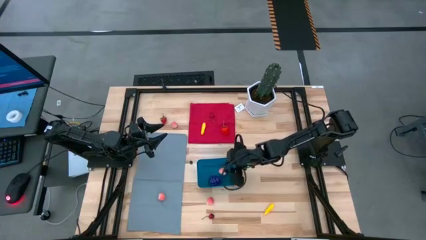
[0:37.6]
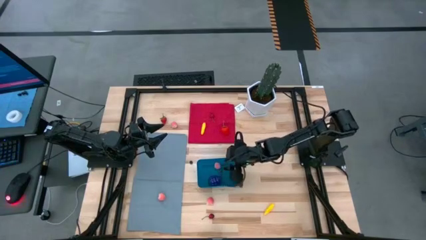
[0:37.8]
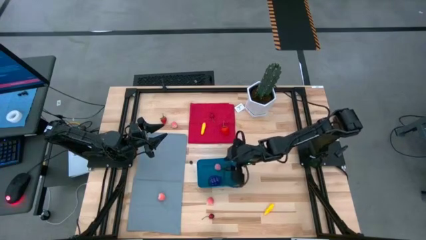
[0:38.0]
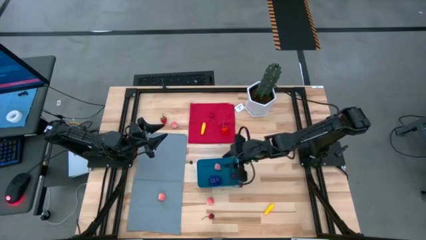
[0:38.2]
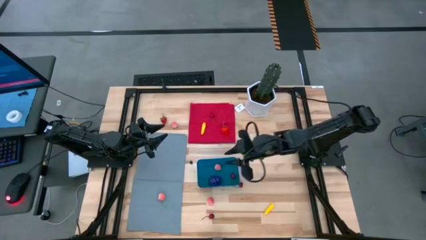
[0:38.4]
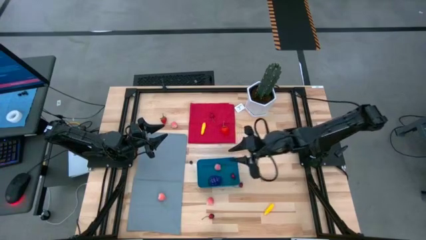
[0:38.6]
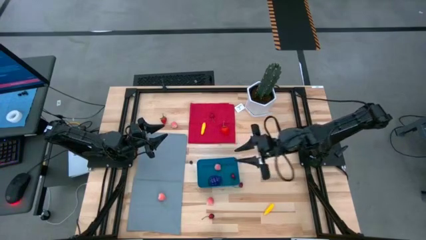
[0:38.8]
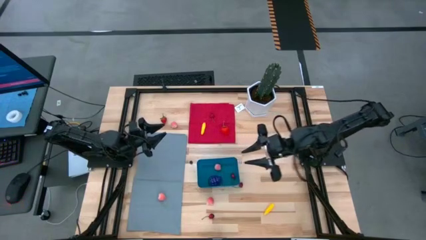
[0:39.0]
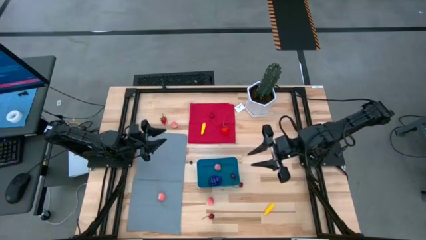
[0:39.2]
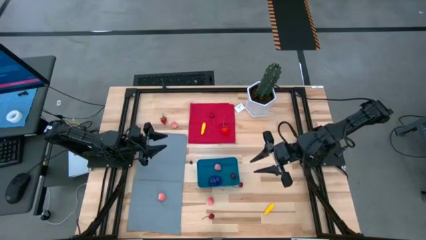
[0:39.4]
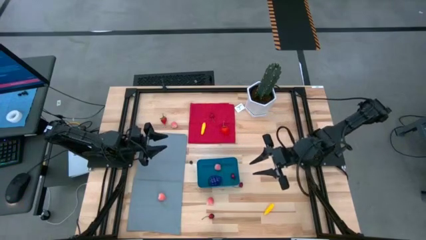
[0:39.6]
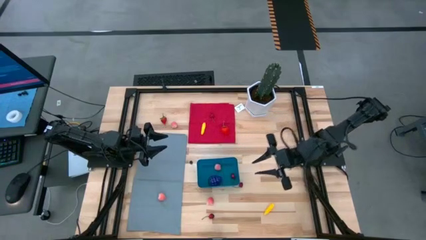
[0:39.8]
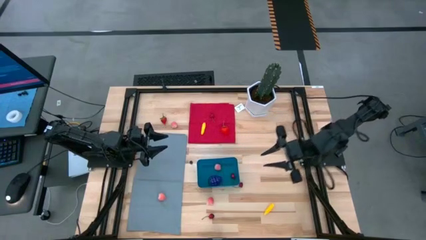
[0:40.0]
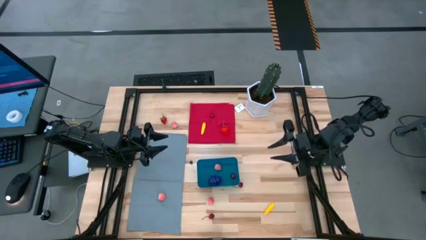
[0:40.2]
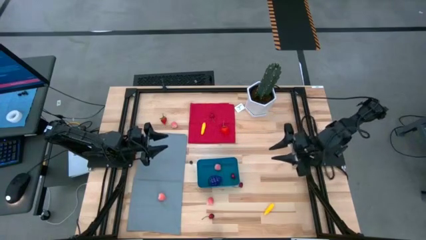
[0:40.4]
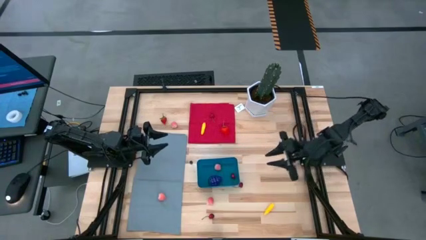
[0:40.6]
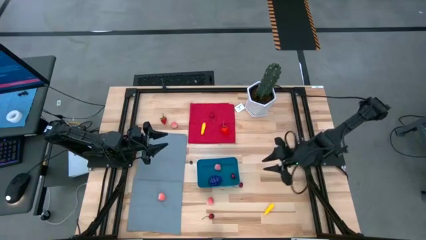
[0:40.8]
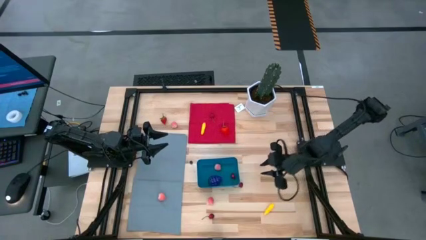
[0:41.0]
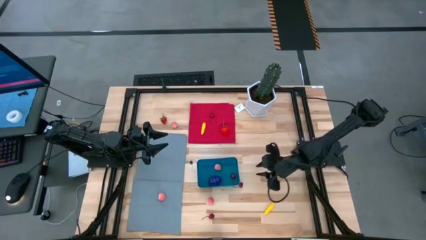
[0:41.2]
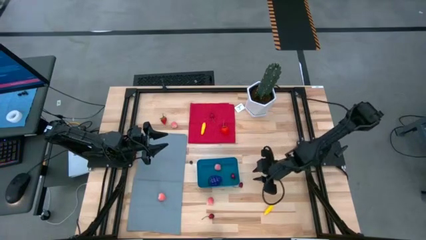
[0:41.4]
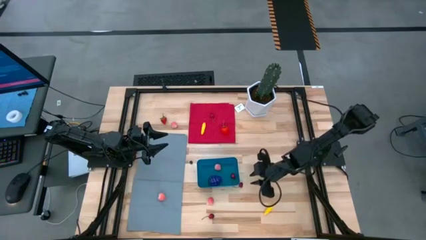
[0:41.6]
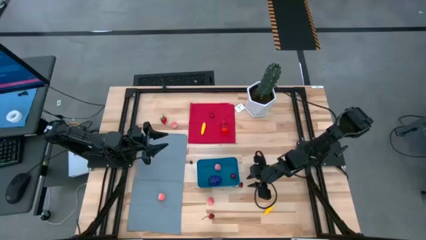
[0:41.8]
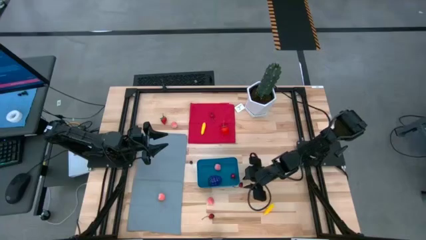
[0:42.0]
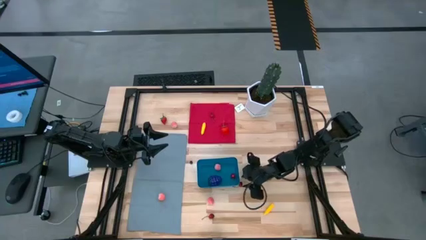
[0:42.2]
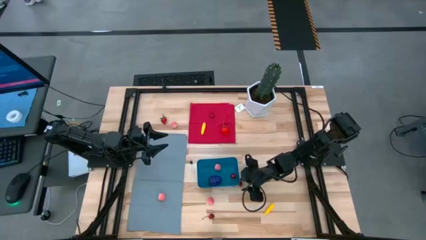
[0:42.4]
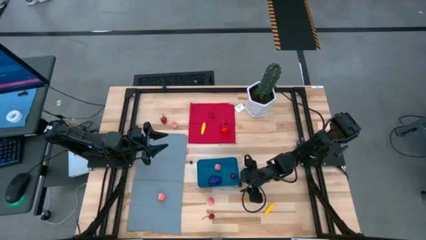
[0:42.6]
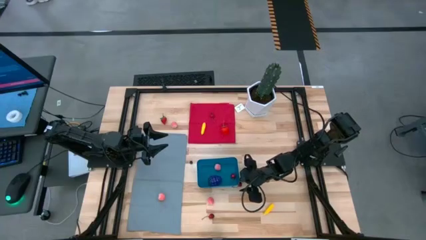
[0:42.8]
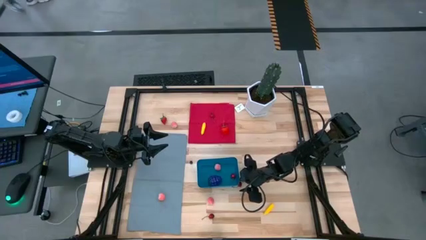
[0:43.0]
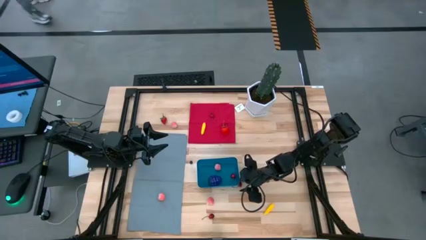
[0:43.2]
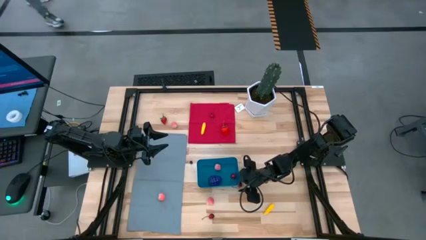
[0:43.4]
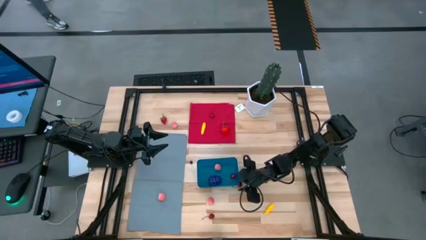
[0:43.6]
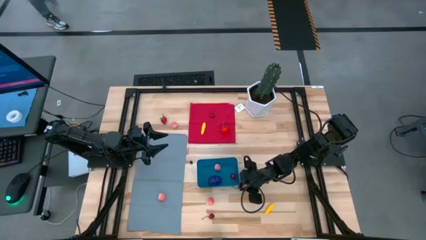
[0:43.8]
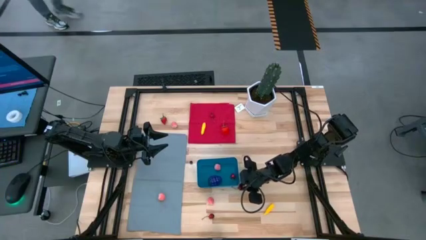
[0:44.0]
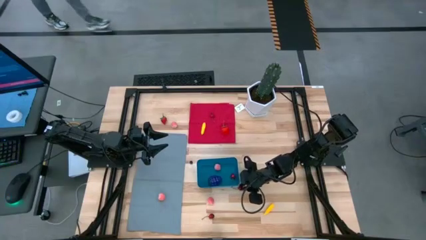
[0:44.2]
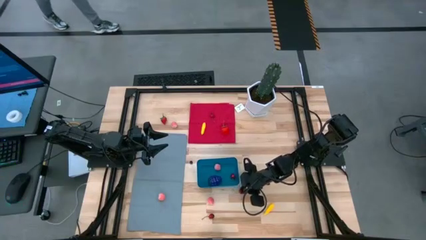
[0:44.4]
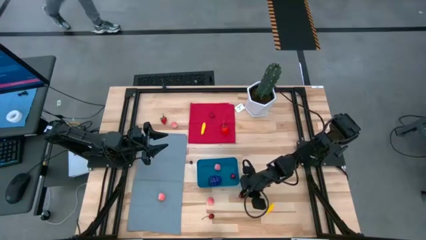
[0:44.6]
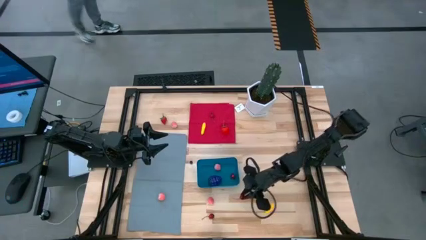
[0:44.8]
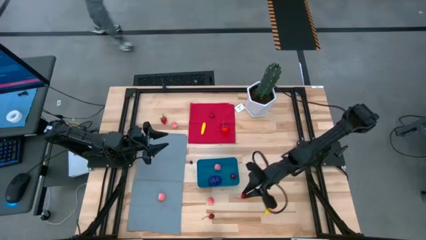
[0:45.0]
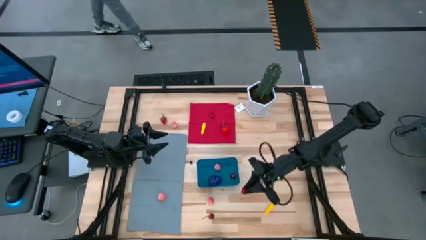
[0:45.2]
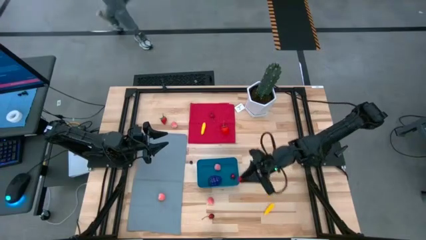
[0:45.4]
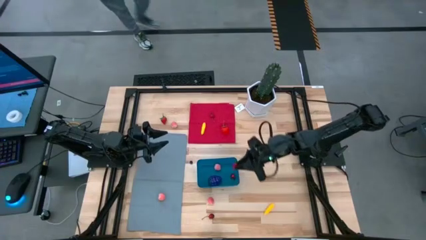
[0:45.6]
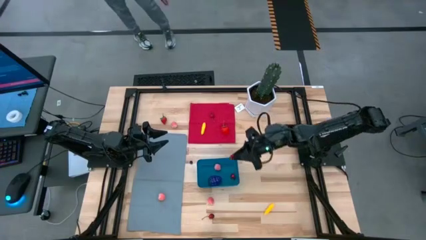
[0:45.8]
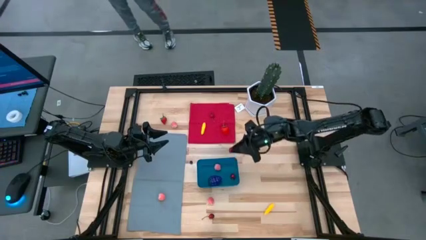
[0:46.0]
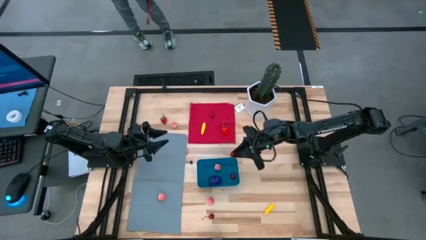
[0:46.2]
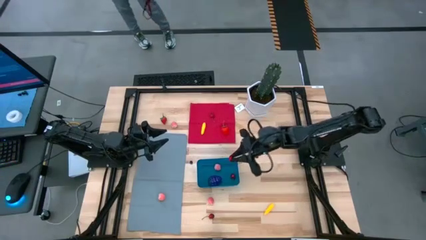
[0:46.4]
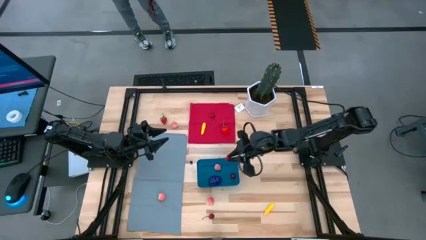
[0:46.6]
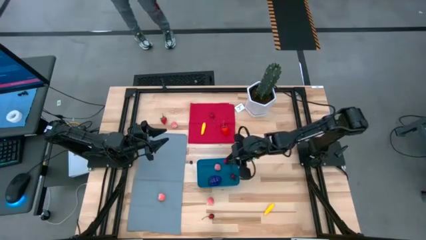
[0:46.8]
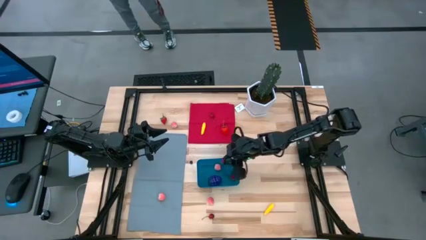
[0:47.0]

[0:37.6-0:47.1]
Task: Pick and placing Produce into tupperware
Put the cherry into the blue bin
